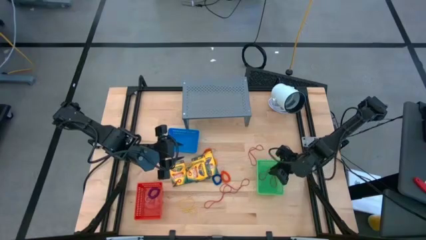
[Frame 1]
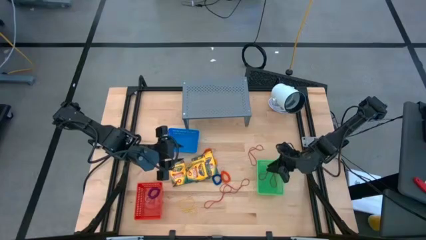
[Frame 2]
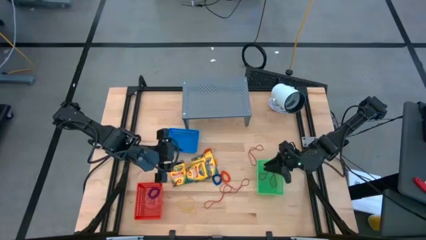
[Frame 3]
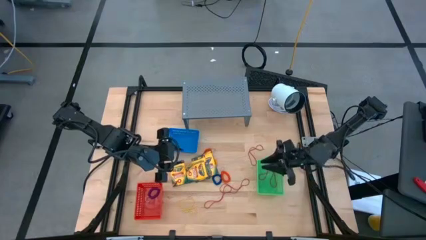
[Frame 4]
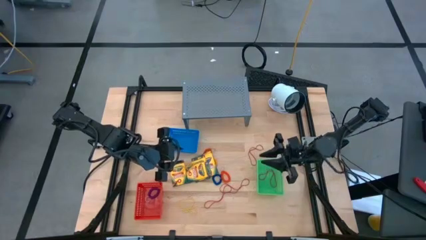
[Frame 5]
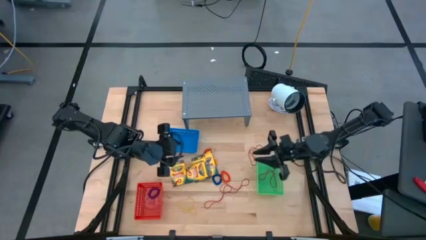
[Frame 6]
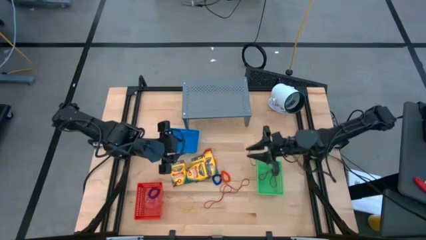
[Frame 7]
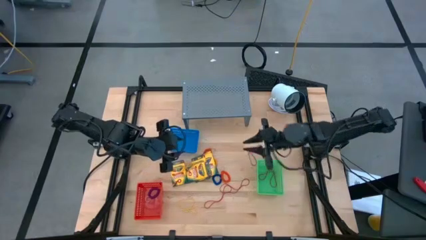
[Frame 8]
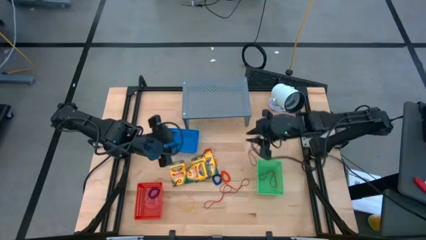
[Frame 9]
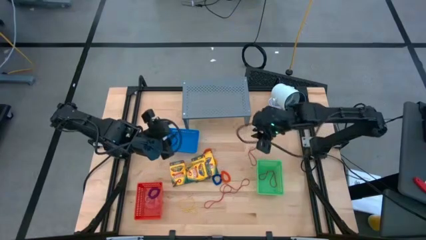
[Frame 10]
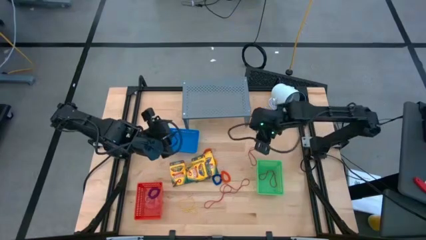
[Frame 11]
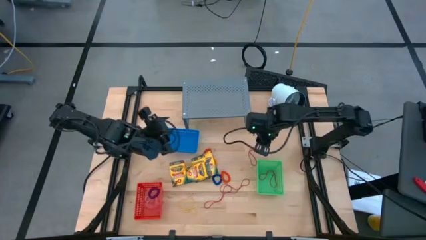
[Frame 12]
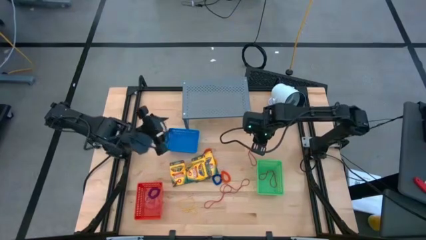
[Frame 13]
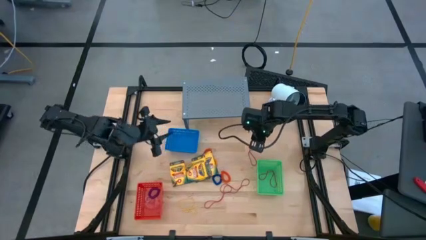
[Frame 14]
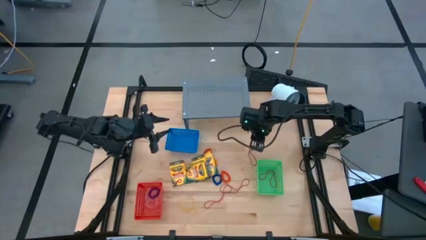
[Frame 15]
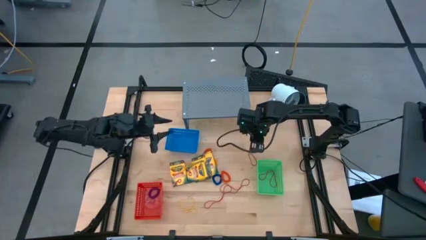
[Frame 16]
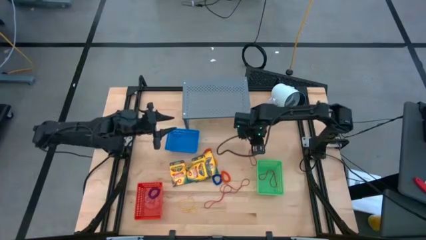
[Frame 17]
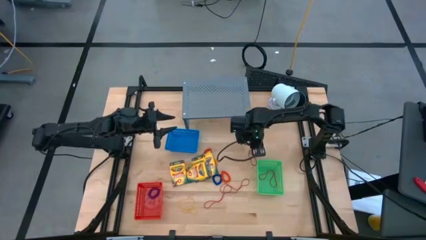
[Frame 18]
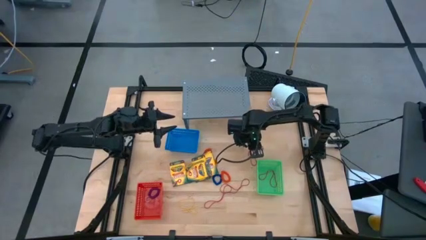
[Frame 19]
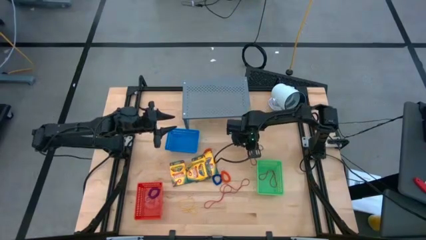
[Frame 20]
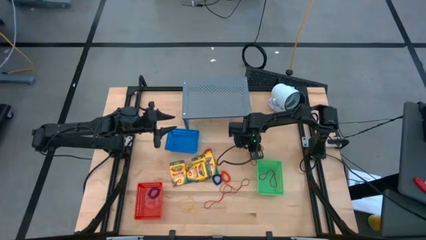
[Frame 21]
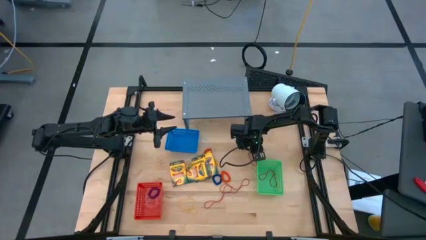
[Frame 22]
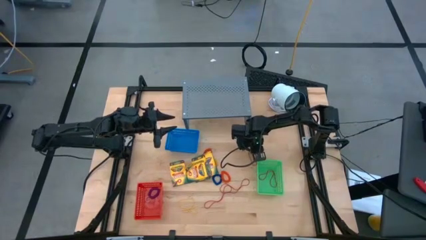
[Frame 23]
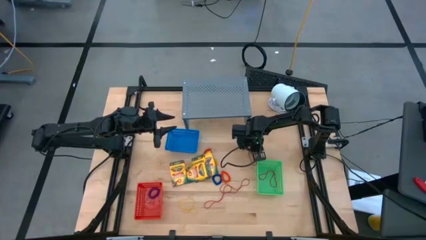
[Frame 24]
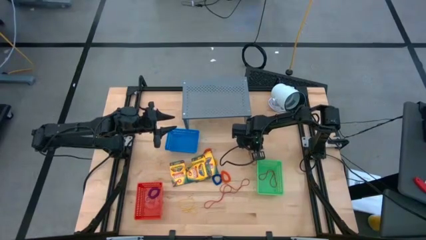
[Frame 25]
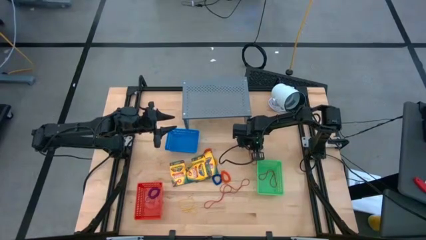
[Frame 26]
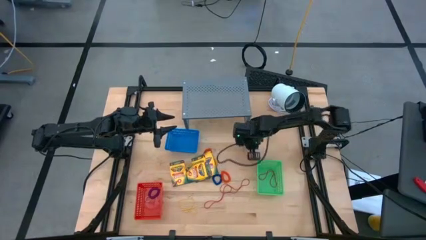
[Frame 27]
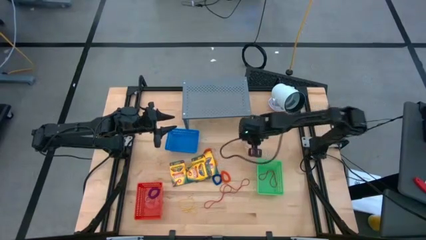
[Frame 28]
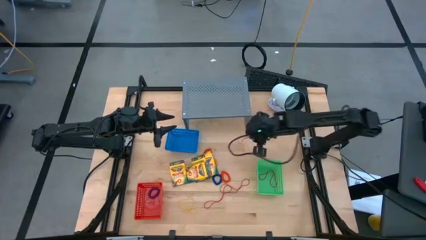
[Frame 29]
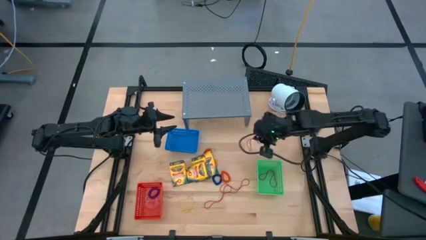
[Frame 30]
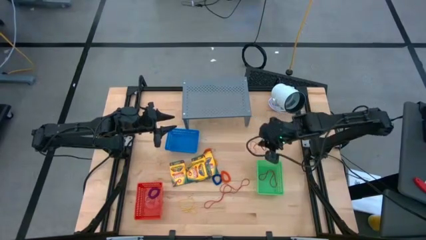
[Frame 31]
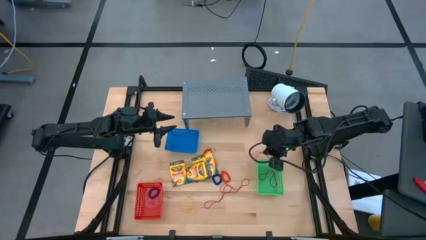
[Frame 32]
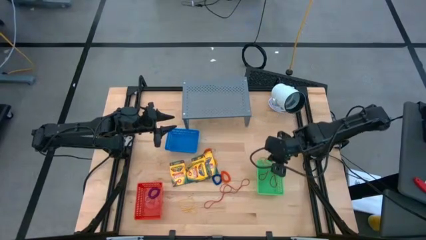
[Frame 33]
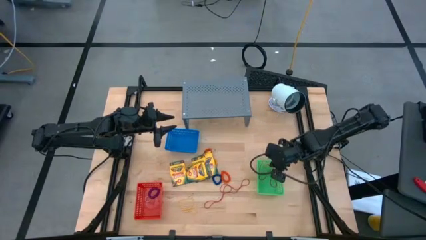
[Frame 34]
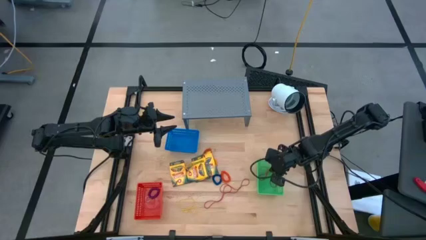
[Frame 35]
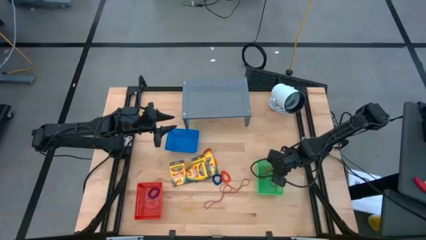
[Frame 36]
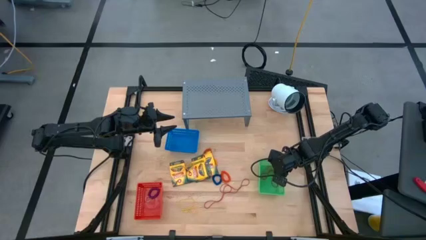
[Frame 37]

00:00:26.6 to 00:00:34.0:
Task: Pick & Place Office Desk Supplies
Put the red rubber band into the green bin

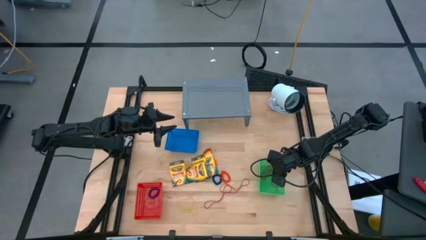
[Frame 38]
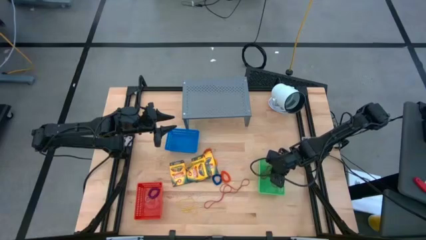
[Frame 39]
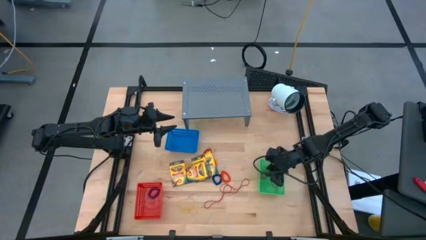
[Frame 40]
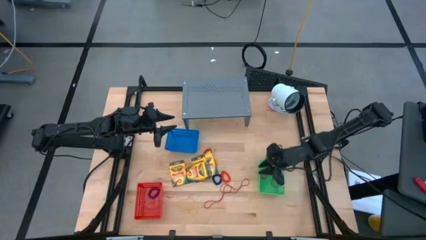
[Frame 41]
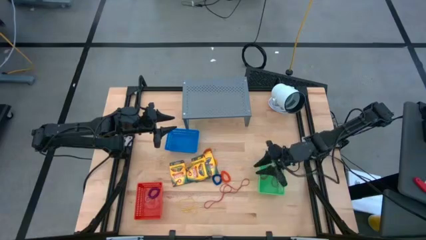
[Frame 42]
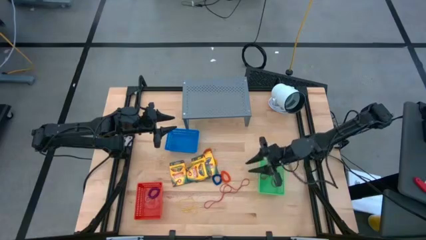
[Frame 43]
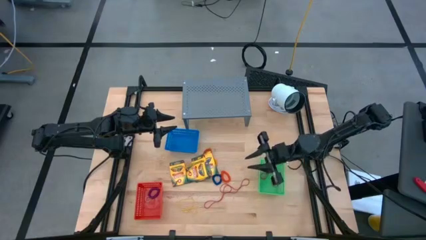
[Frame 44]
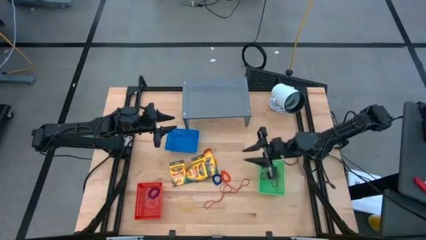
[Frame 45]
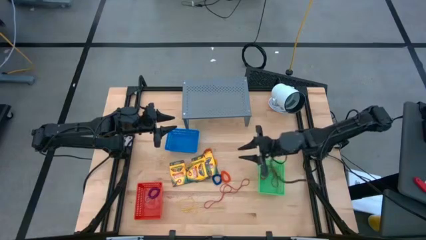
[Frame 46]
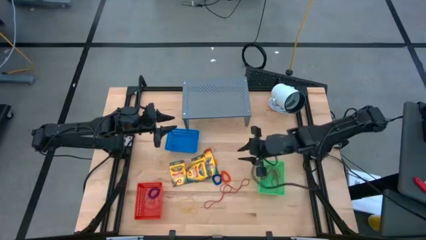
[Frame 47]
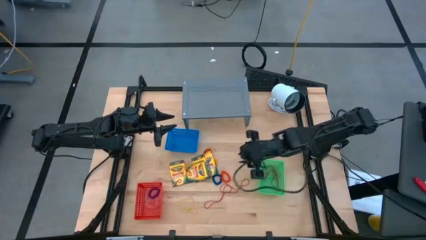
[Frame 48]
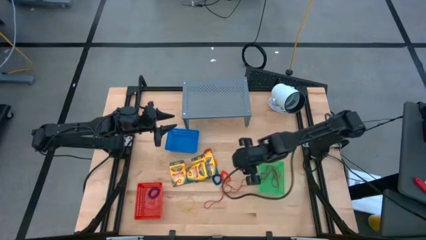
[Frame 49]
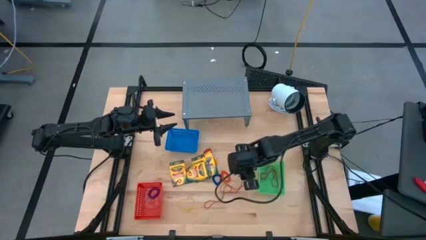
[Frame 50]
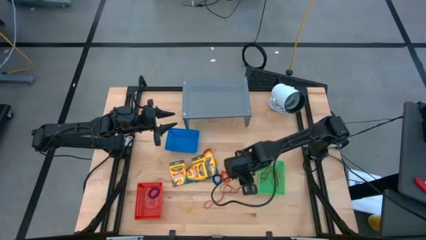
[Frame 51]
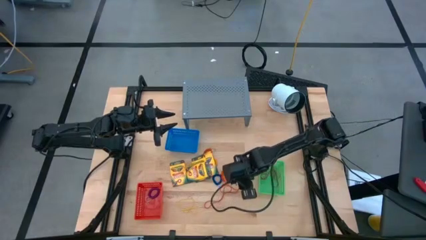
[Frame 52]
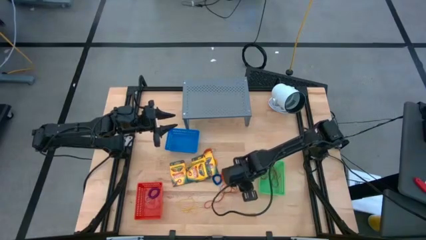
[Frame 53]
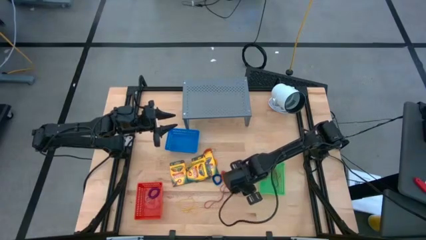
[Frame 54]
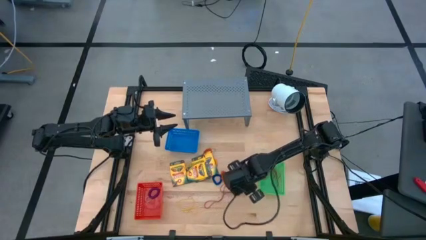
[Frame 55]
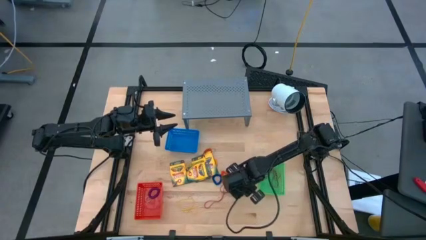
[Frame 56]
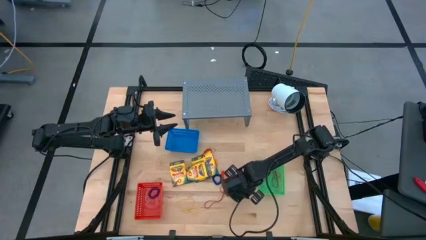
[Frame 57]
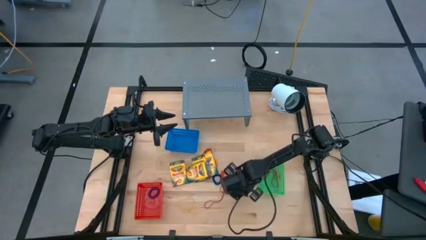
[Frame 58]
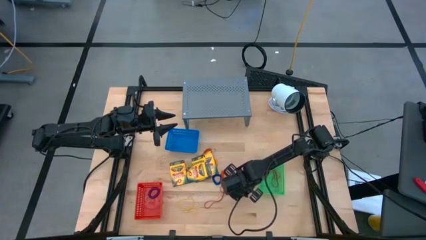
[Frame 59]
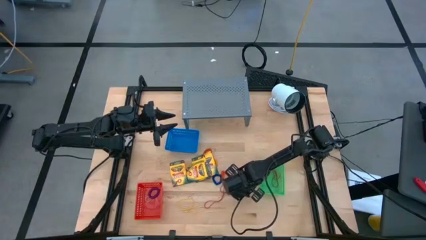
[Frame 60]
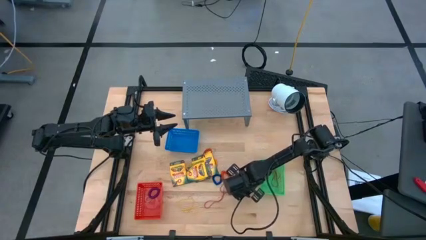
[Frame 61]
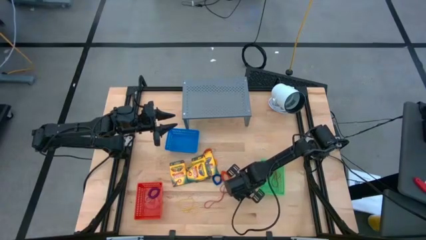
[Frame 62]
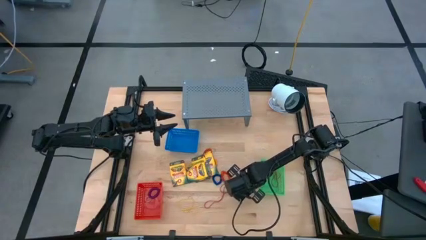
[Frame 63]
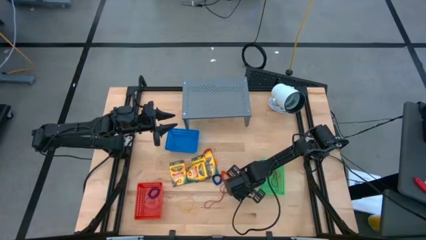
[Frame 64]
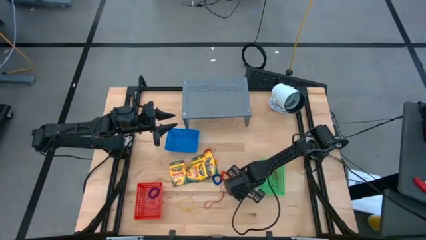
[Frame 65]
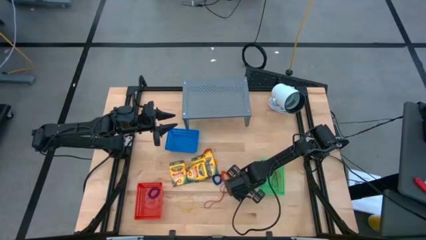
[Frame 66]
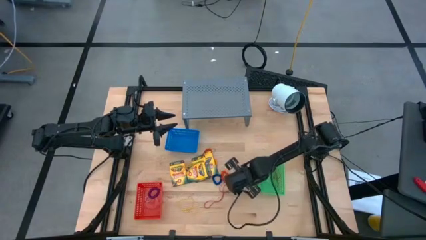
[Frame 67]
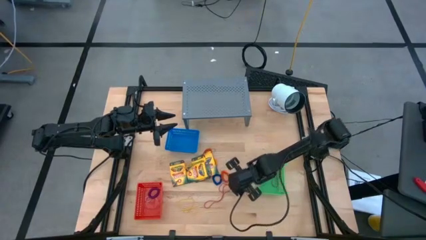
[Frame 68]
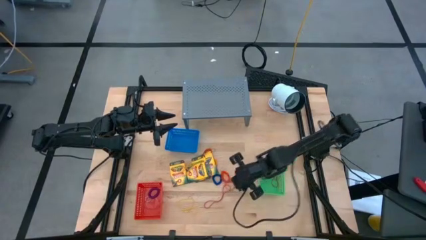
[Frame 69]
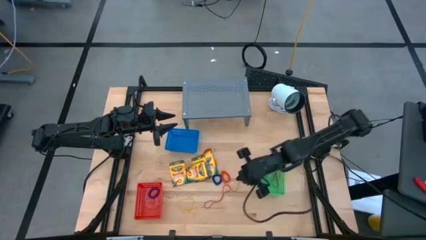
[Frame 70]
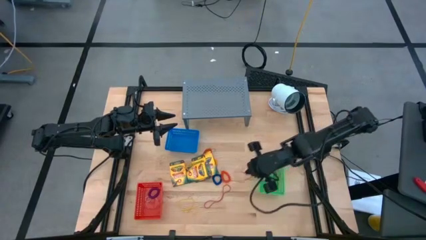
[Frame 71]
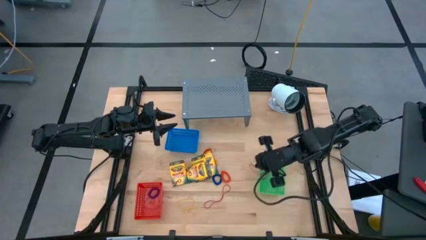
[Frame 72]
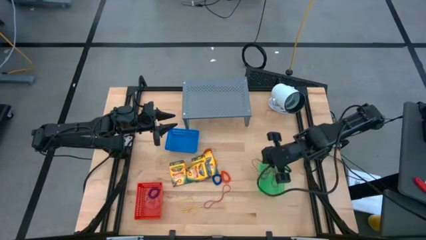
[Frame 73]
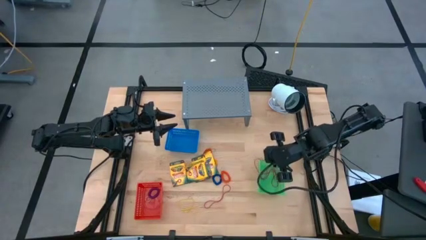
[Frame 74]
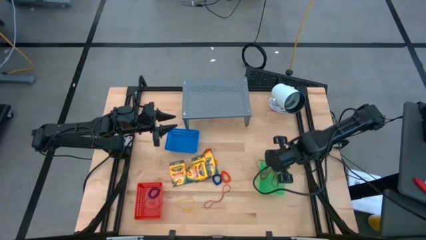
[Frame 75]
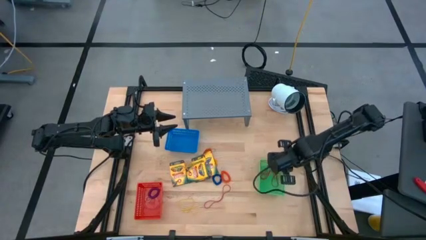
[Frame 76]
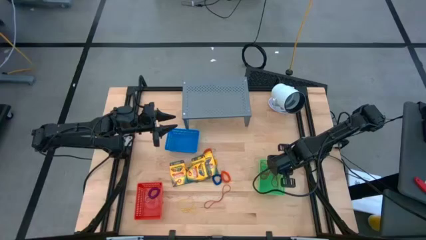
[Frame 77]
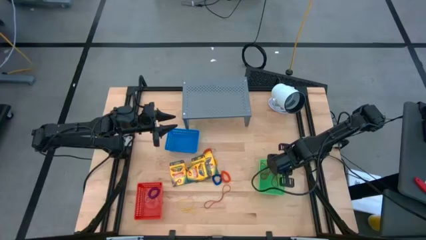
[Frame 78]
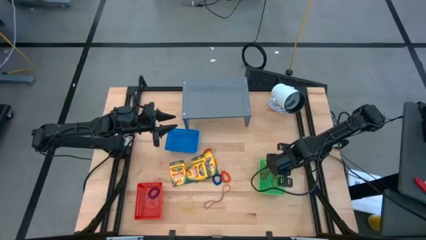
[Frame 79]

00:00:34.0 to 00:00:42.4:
Put the red rubber band into the green bin
